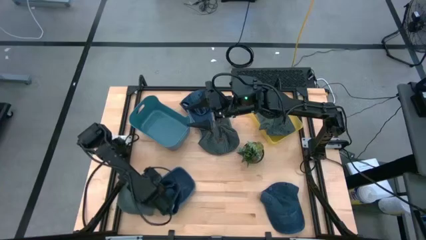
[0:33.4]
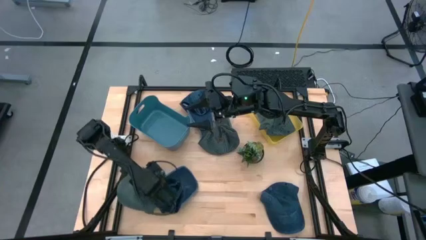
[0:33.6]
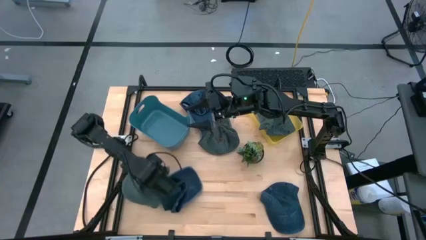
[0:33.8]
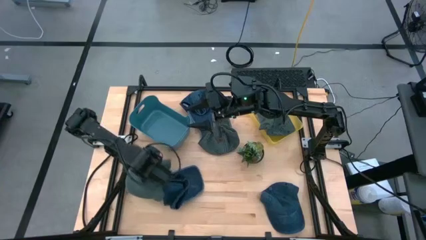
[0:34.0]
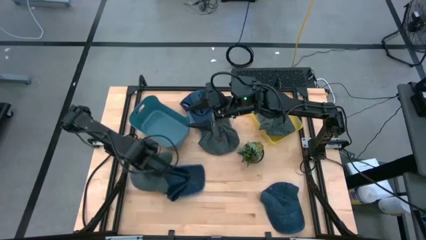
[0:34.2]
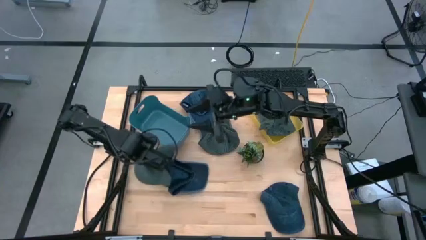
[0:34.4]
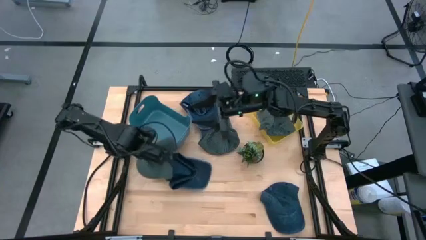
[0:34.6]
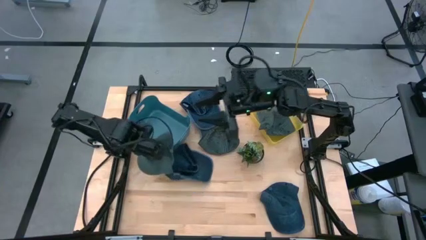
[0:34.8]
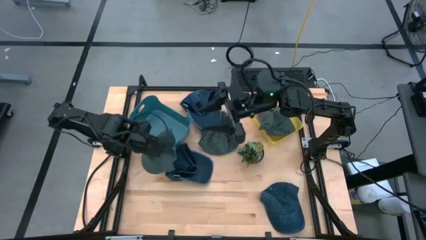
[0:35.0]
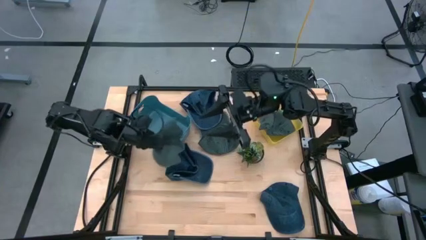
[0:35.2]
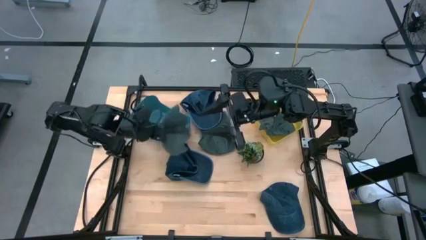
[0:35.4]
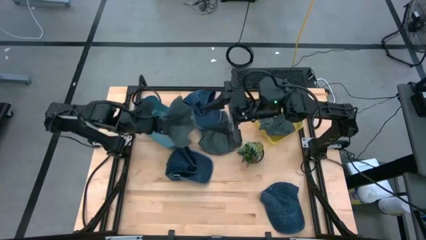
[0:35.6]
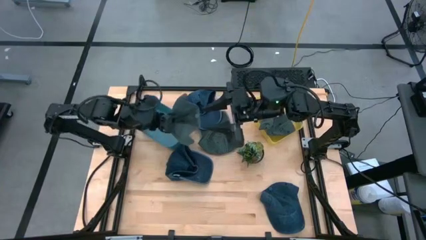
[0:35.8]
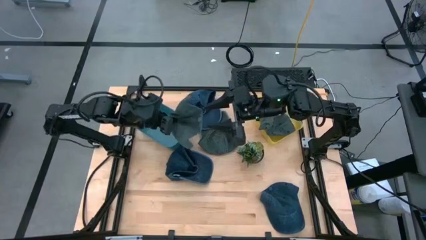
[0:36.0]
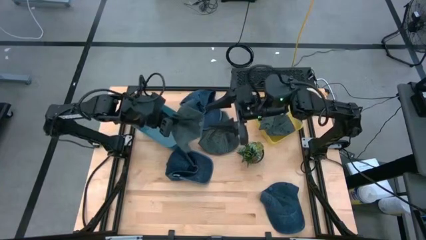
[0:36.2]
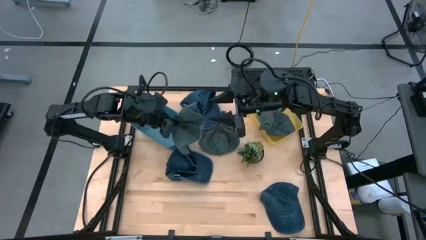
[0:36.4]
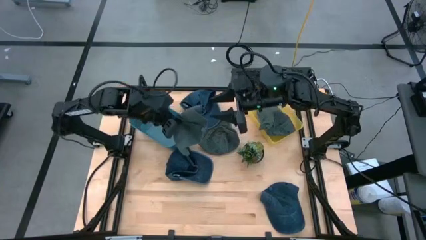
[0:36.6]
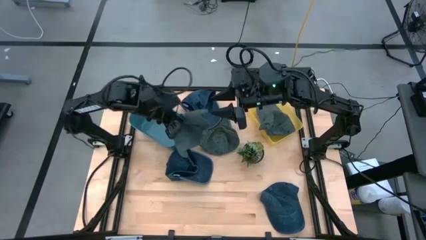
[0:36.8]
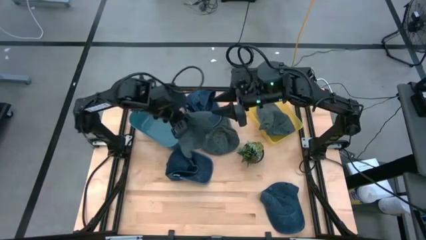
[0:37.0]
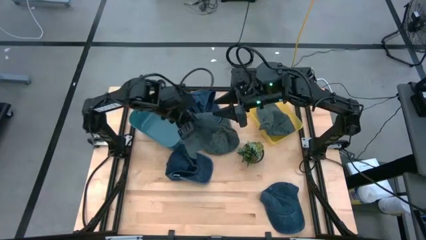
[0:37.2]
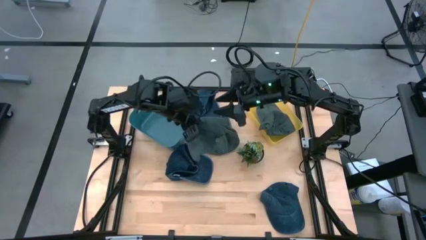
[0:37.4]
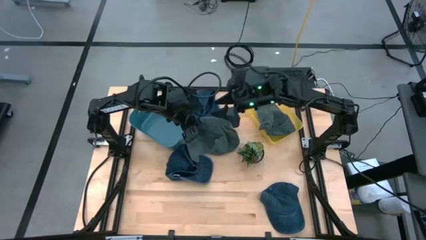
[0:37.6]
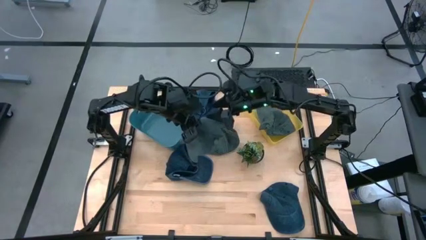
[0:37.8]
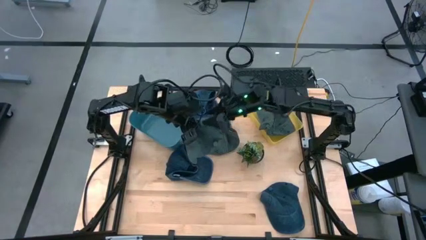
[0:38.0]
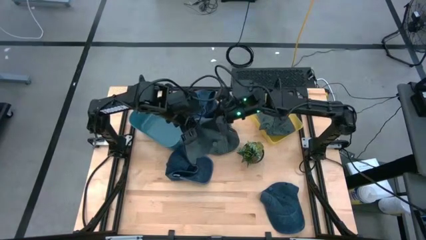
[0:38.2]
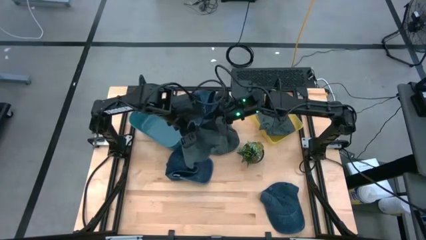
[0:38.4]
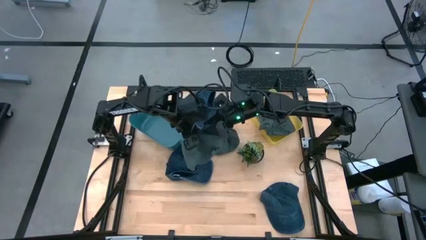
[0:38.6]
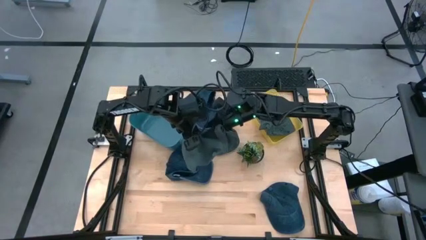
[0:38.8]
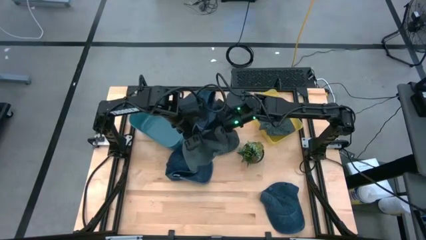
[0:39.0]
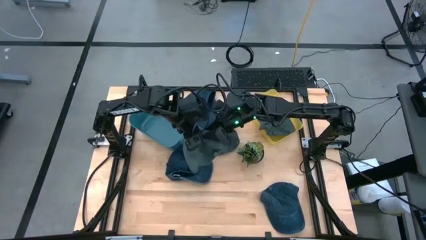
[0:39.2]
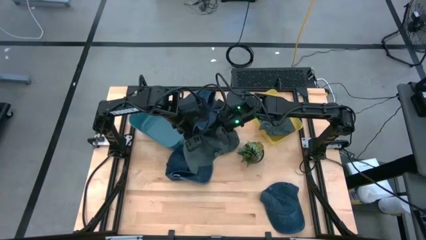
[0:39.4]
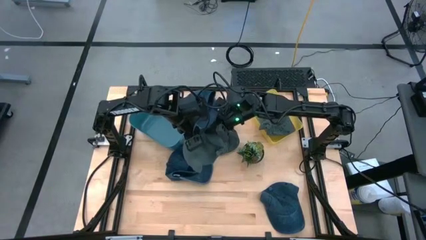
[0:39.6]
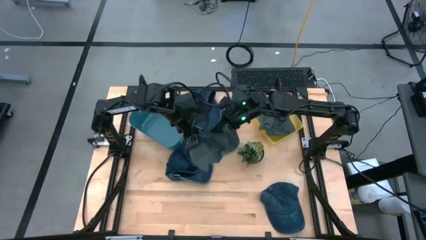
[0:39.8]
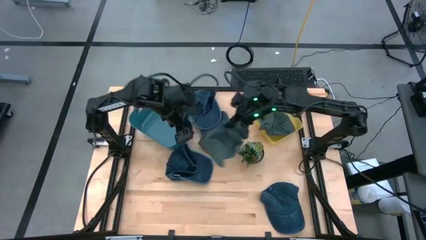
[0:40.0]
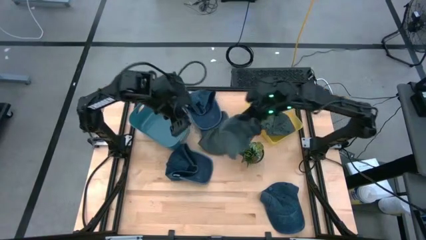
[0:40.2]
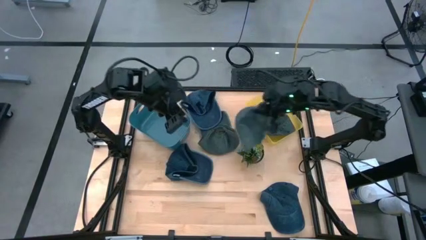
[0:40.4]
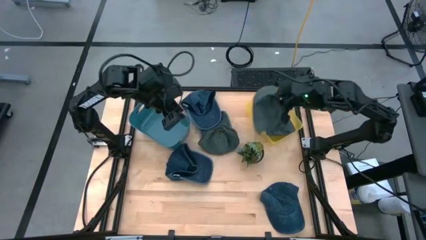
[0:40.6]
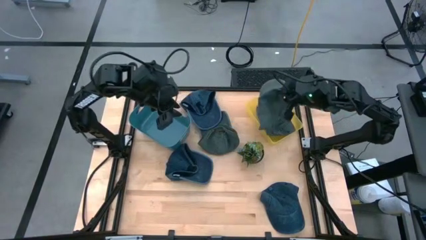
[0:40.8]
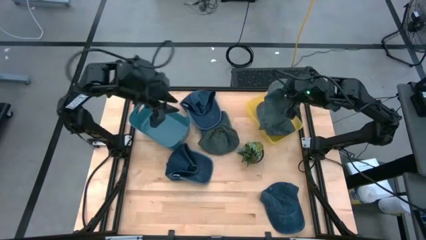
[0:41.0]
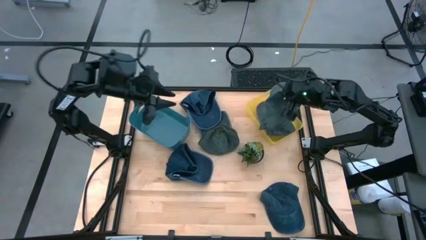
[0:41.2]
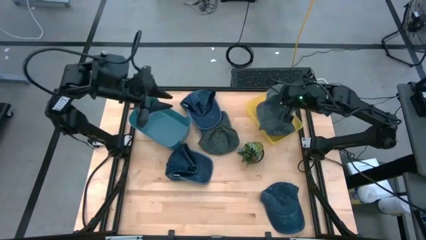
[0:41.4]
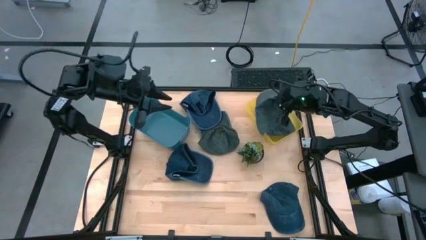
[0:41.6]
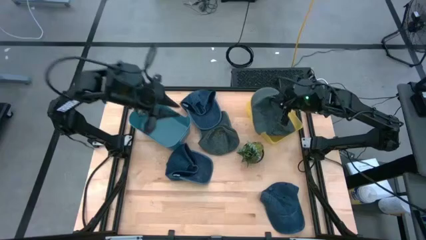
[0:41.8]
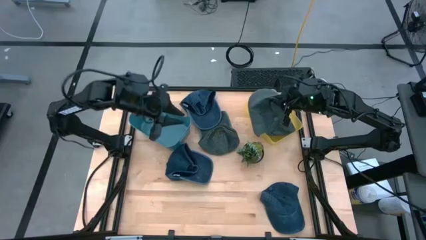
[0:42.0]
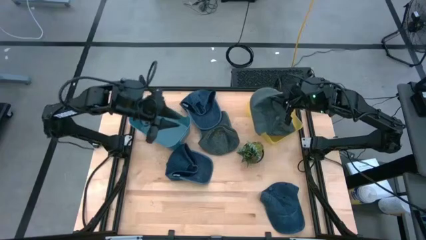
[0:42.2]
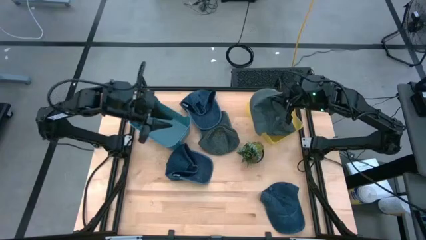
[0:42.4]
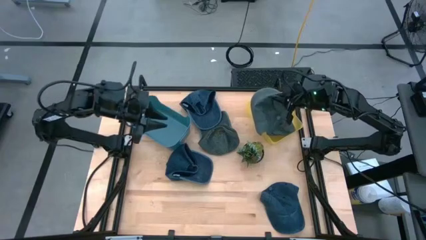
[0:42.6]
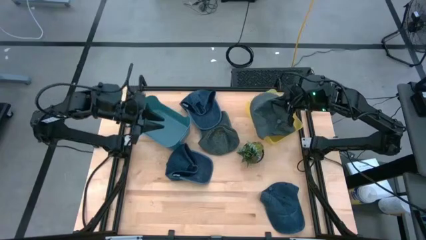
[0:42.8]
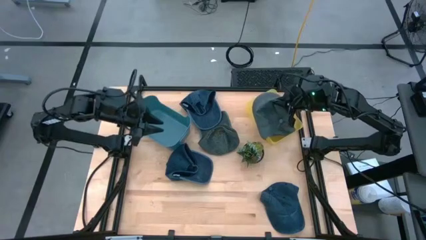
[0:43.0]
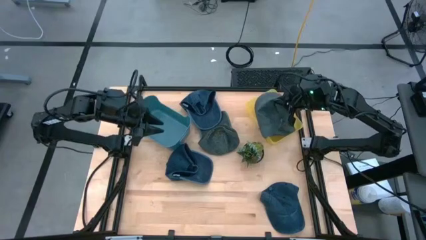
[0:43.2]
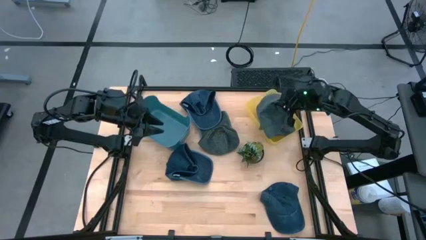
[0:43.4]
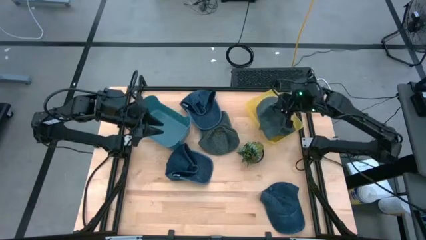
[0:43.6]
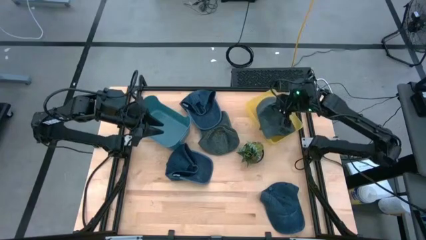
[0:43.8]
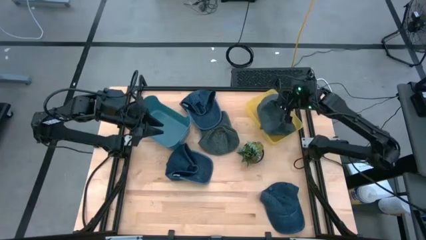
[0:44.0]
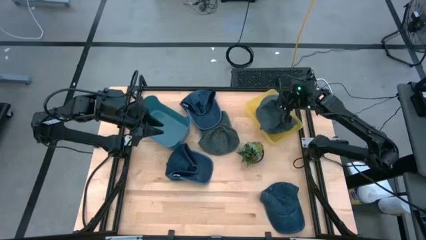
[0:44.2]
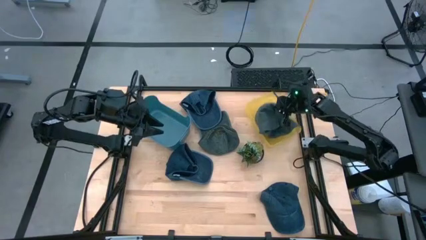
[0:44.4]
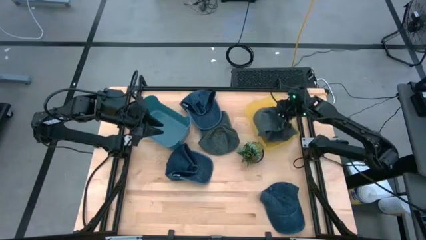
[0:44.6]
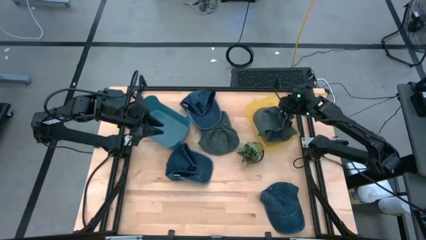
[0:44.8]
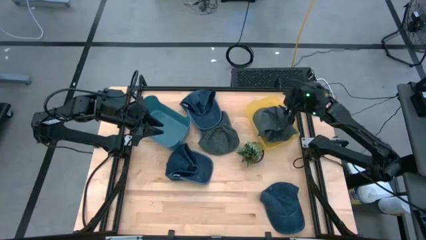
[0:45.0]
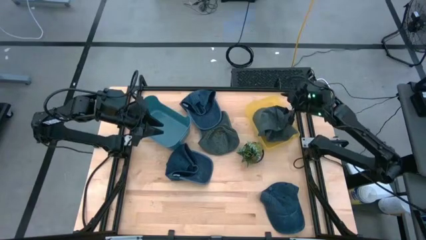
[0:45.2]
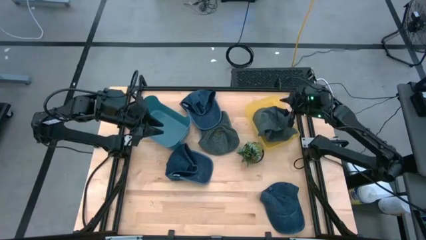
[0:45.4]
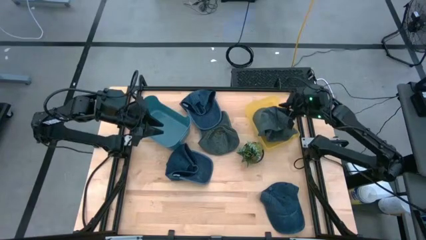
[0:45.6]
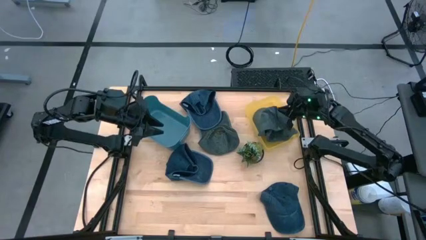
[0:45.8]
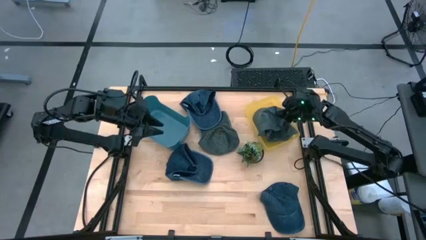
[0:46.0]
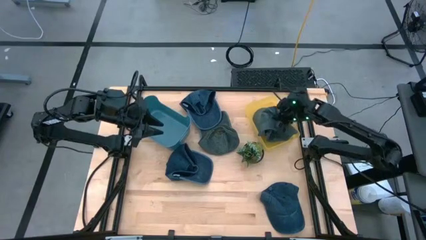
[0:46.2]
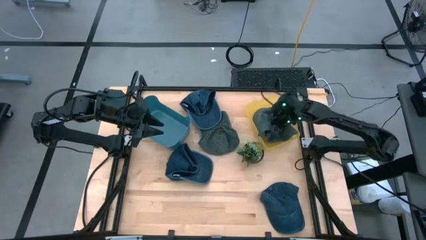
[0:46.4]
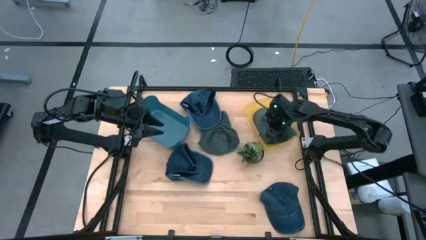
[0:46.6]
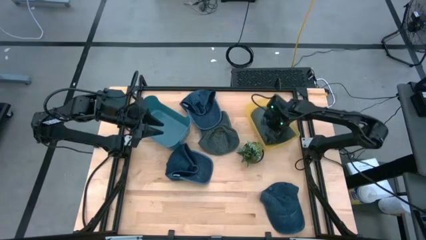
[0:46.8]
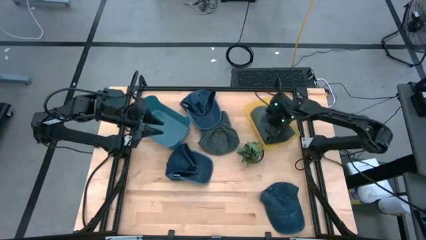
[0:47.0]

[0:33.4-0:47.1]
Task: Pick & Place hat
Put the bottom gray cap into the yellow bin
